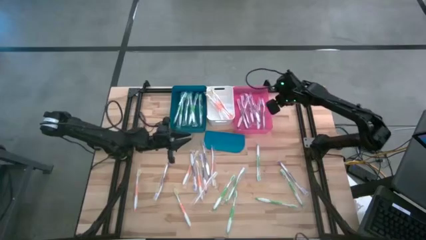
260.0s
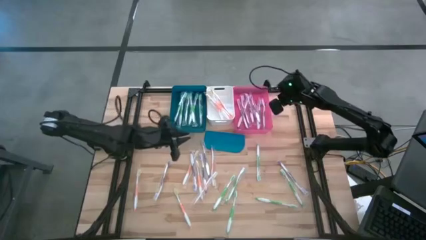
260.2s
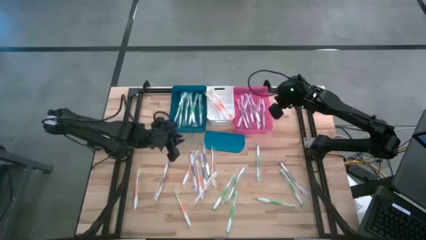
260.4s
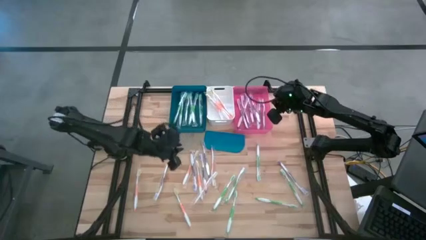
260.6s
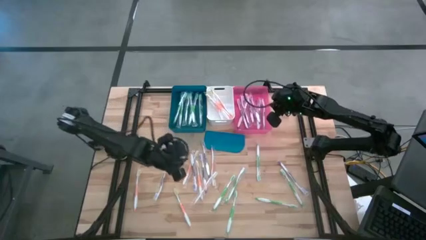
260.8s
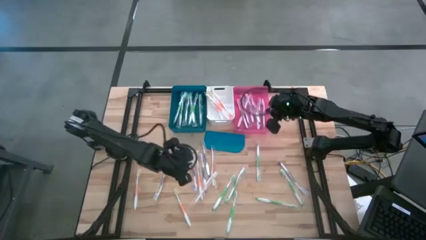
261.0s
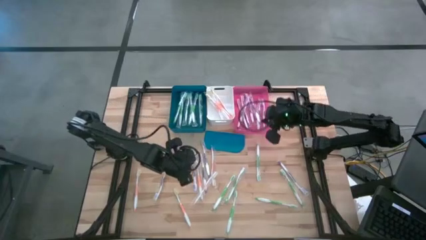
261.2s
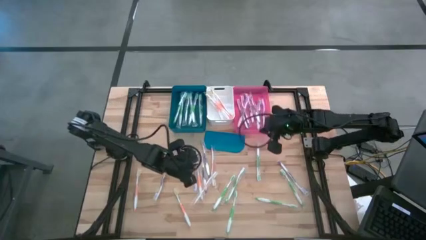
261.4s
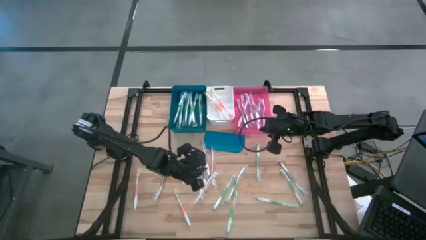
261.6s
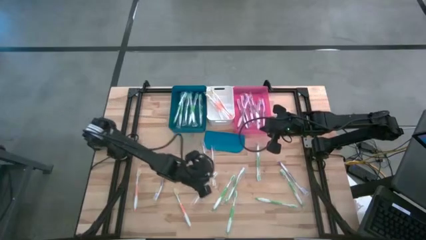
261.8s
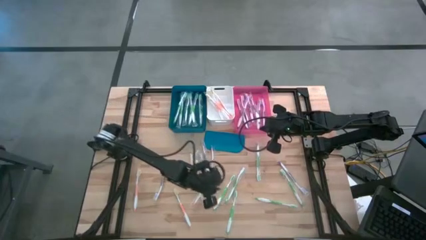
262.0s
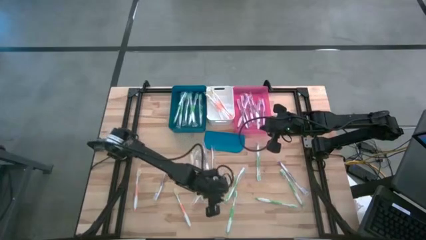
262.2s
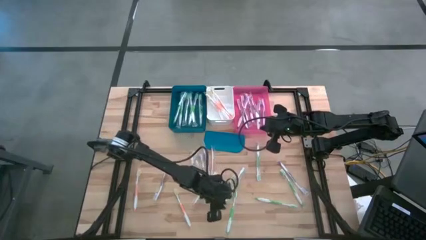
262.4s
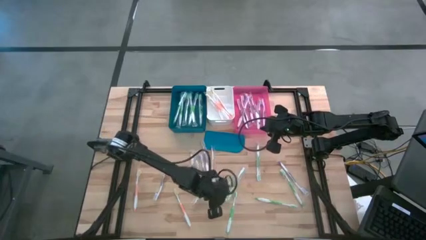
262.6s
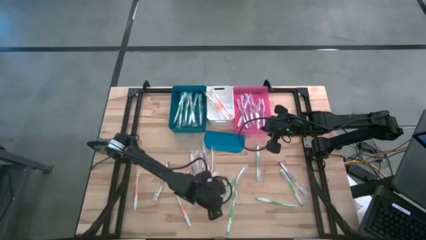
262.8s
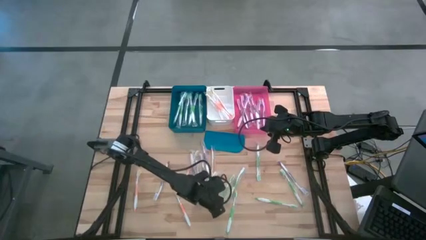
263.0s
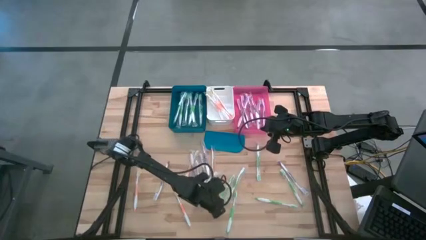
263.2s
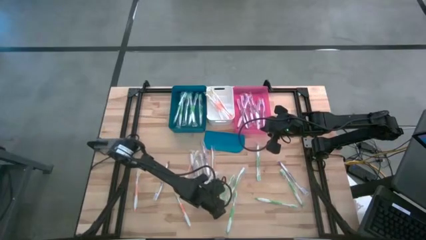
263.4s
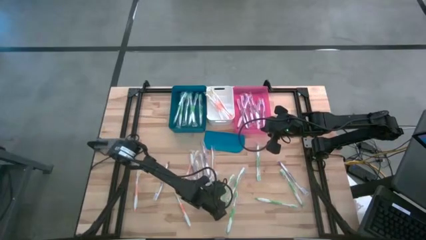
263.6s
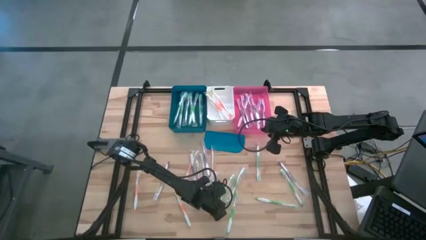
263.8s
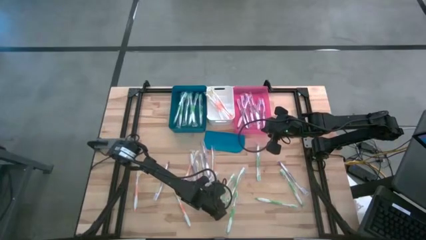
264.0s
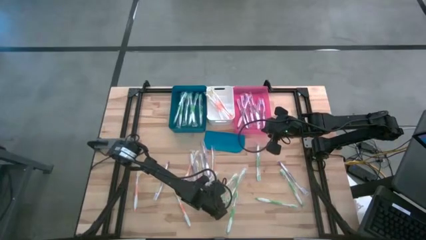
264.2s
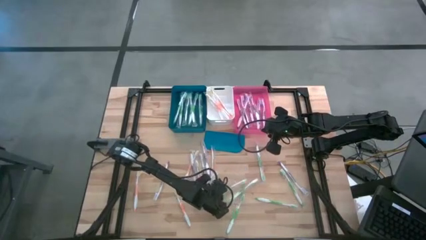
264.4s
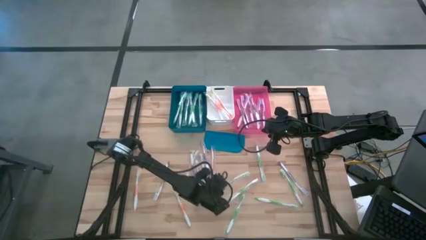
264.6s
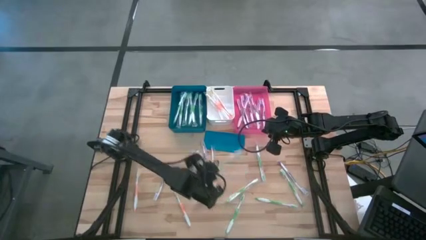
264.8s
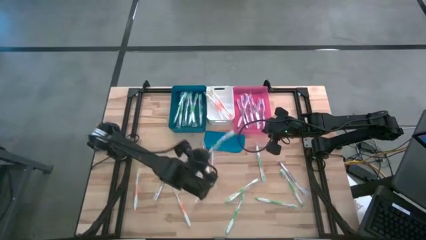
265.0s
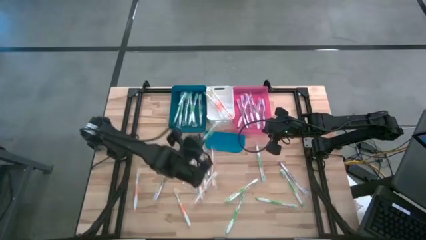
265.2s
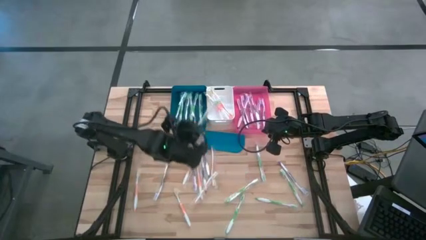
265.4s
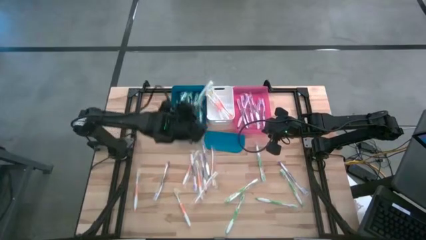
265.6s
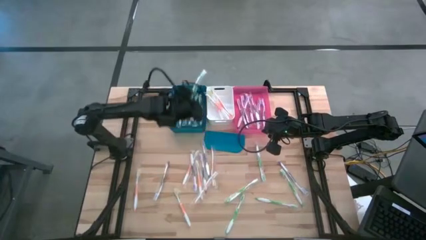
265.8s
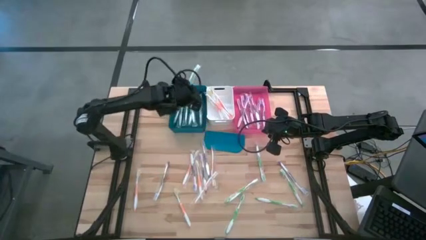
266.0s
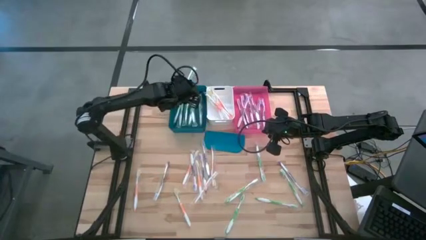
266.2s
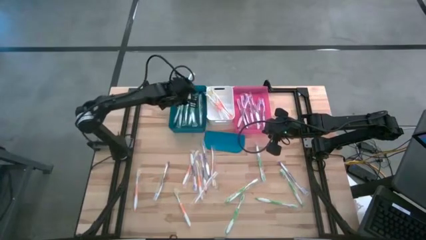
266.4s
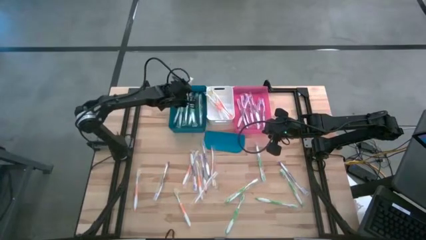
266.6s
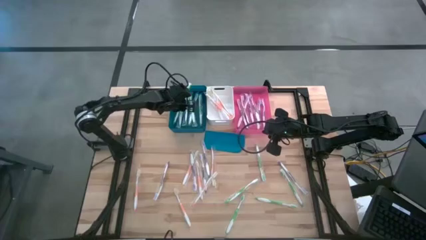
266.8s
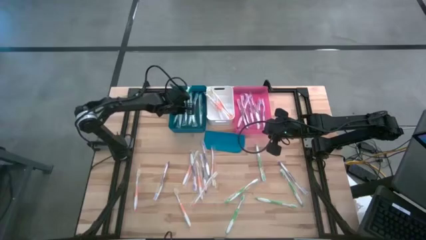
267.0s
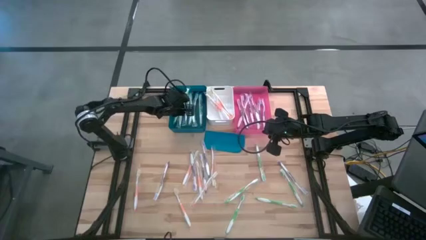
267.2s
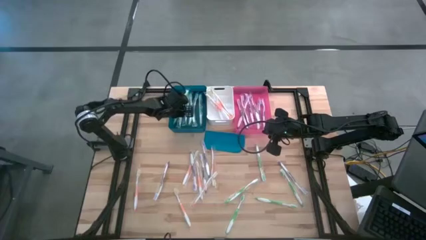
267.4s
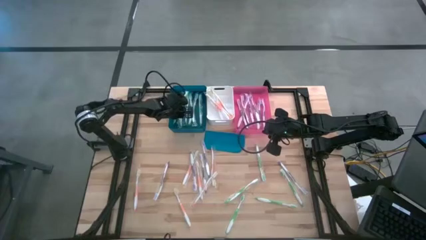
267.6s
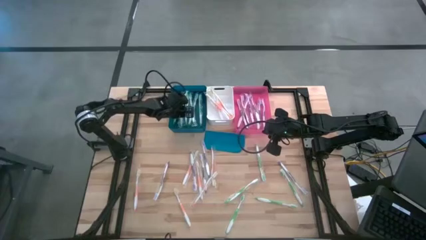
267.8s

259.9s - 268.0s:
Task: Pick & Place Toothbrushes
Put the green toothbrush into the blue bin

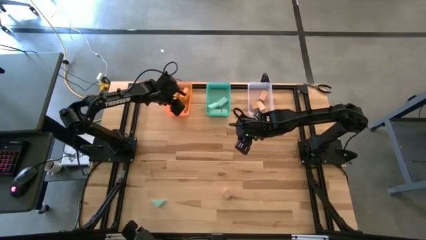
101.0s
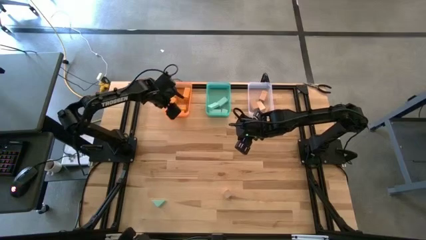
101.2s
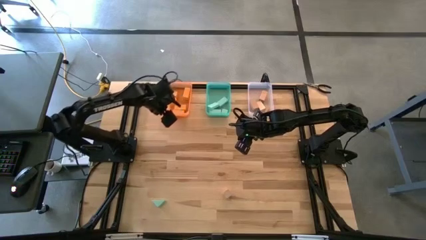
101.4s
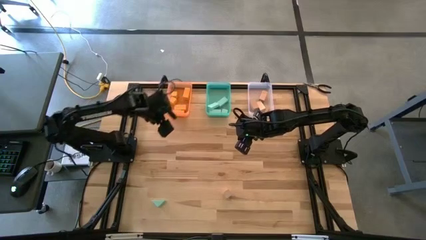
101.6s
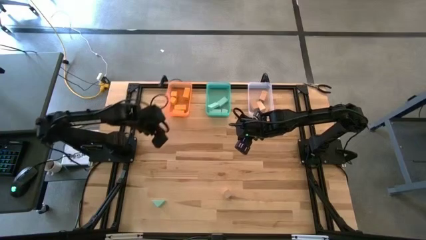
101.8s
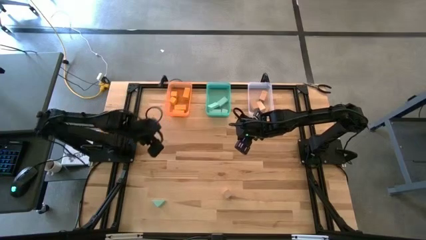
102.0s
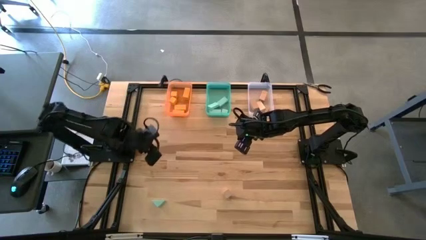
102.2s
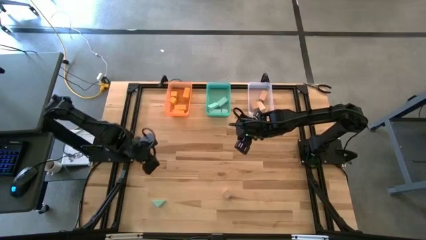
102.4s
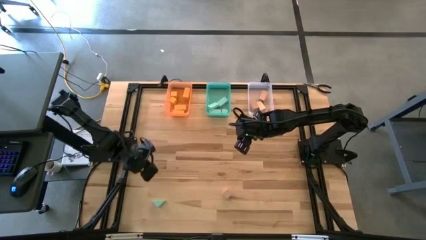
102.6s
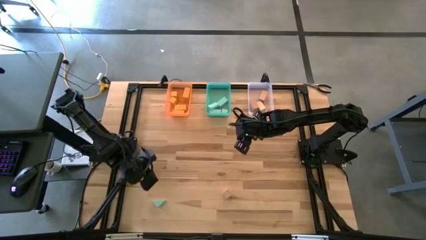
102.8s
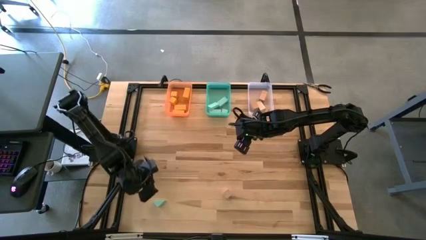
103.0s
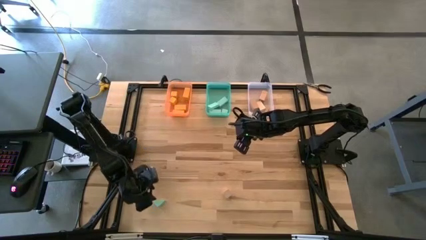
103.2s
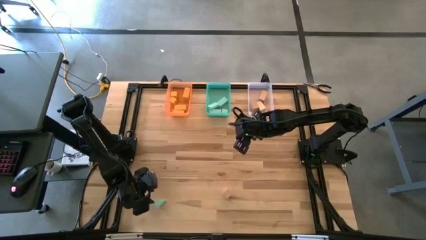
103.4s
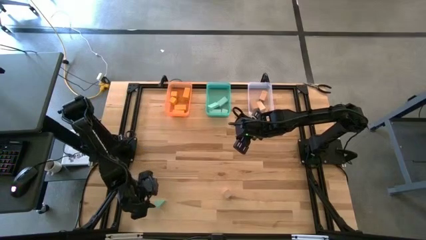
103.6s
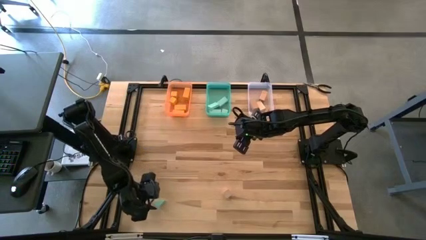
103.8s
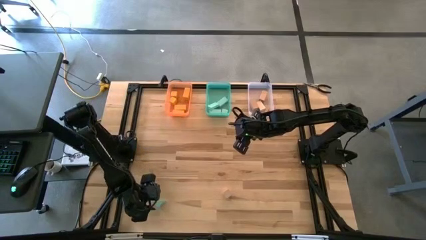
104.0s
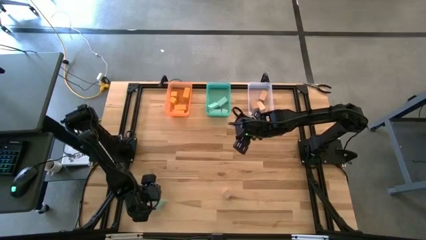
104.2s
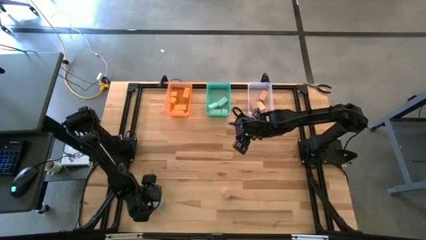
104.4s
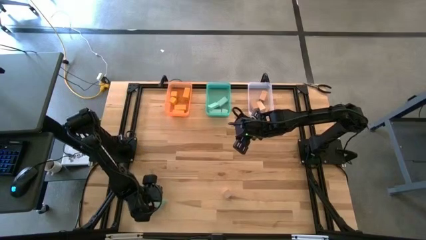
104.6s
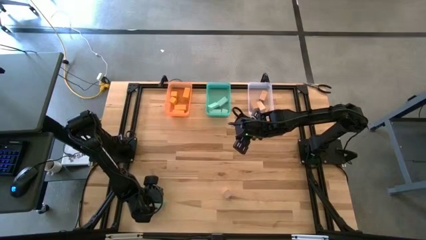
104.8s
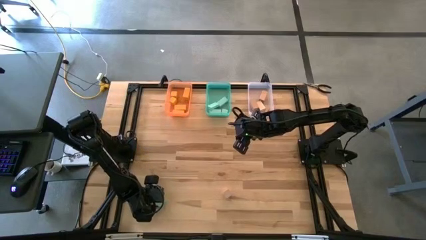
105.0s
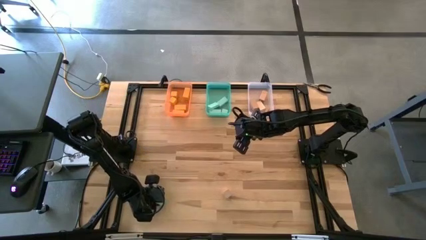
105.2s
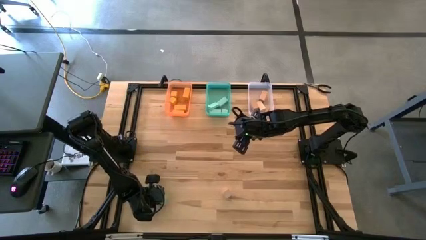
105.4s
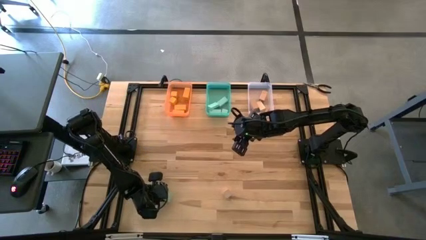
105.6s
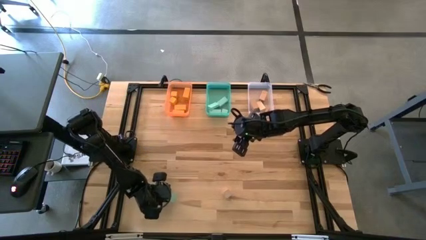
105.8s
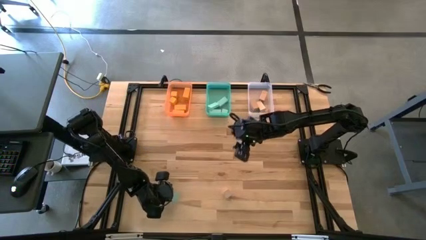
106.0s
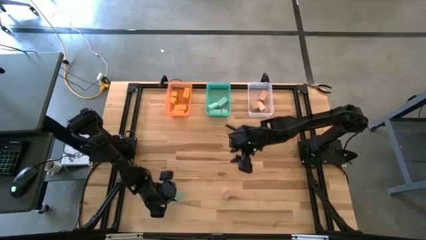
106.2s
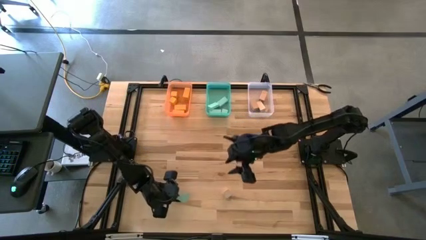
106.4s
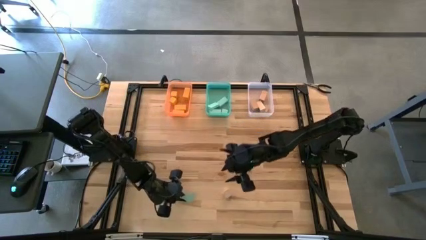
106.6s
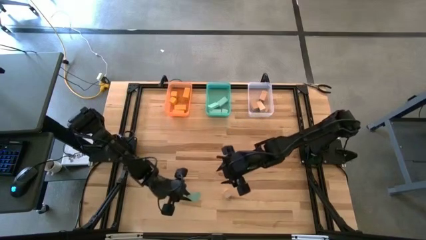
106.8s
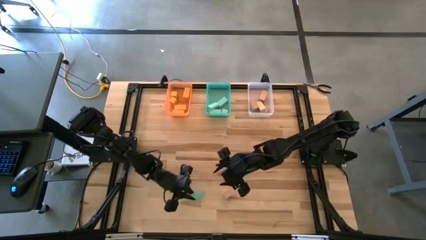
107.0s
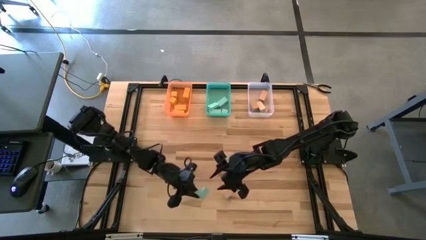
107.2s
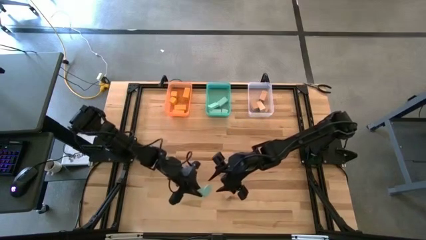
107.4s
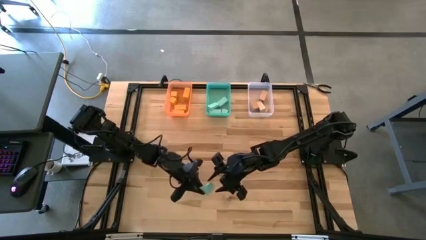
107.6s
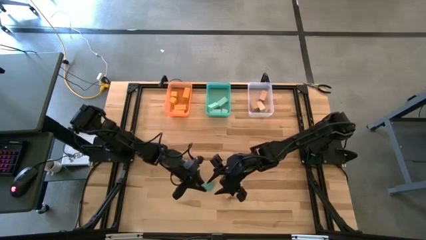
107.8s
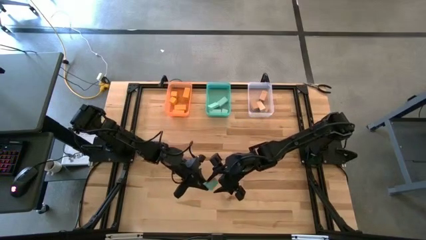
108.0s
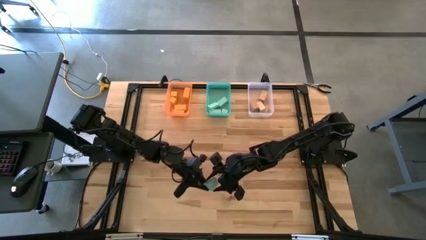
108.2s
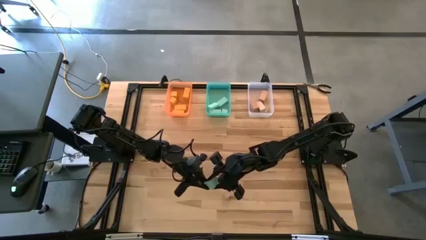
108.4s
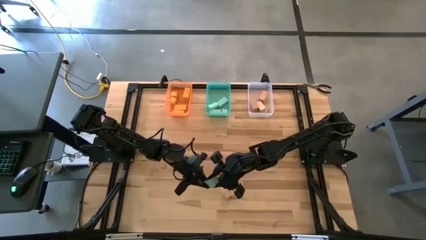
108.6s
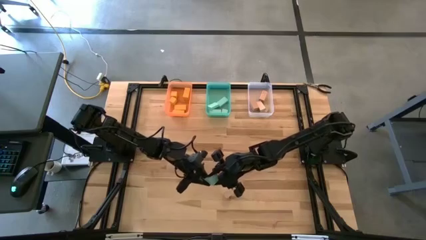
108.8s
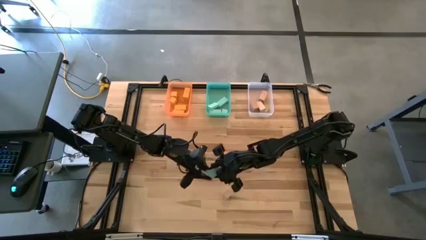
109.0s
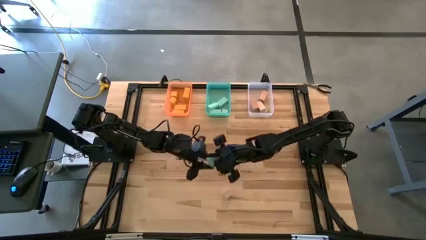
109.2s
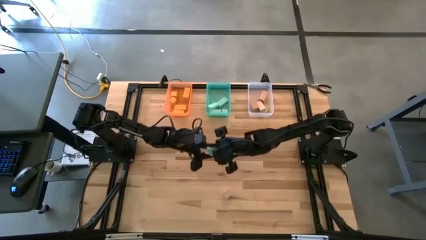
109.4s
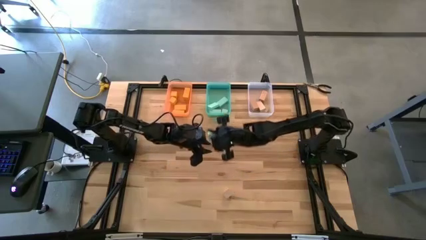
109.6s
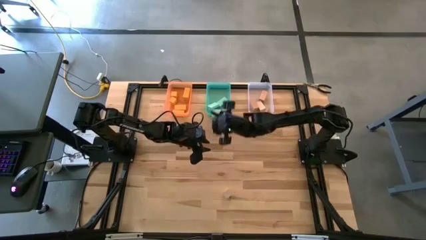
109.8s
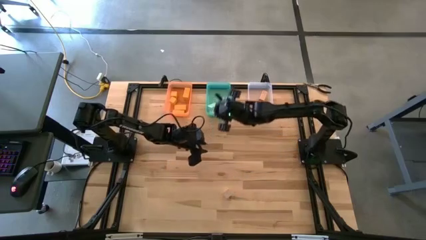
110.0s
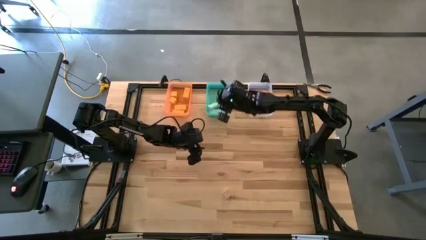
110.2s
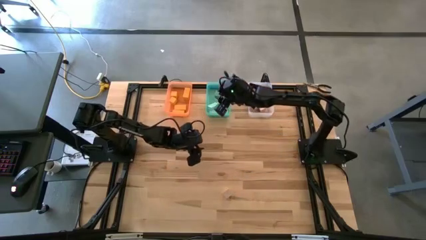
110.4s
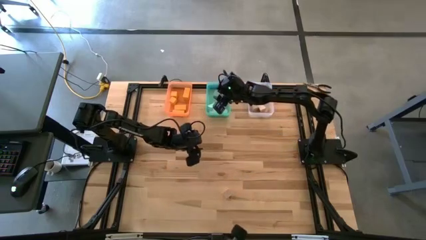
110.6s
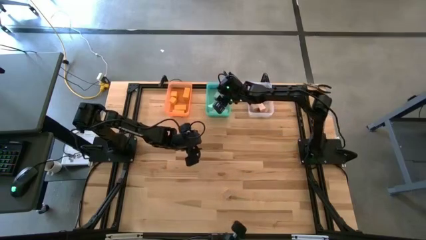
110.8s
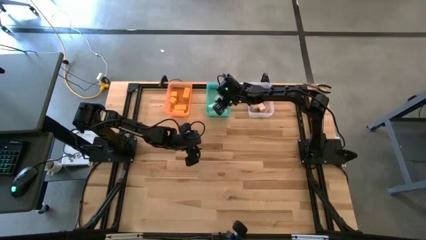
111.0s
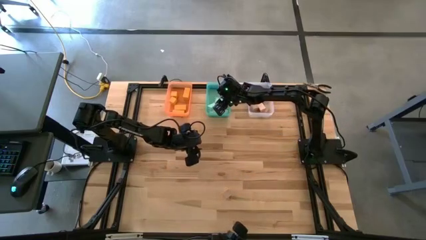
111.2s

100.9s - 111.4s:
Task: Sort & place blocks by color
Put the blue block into the blue bin
